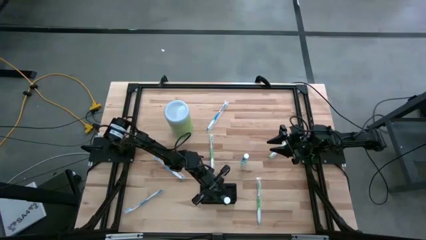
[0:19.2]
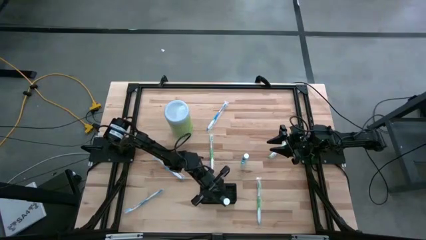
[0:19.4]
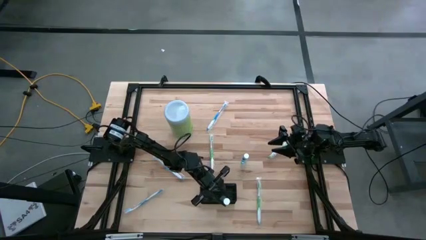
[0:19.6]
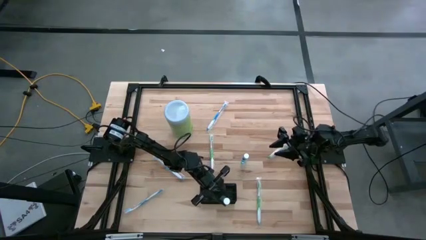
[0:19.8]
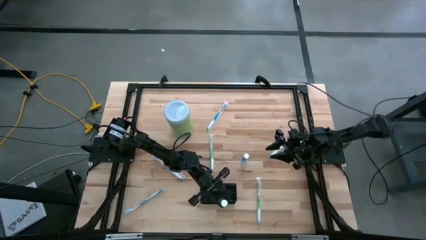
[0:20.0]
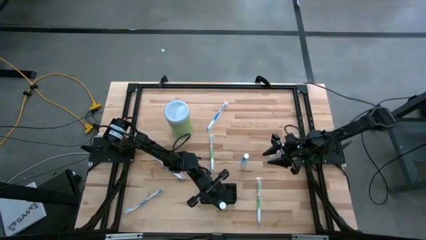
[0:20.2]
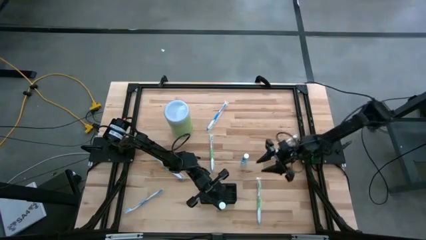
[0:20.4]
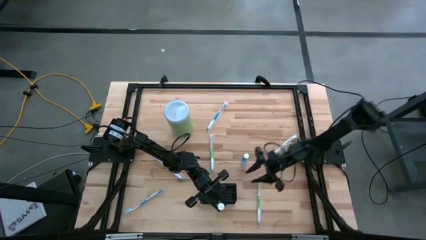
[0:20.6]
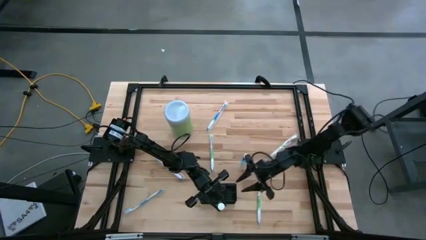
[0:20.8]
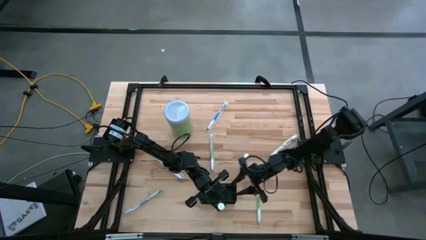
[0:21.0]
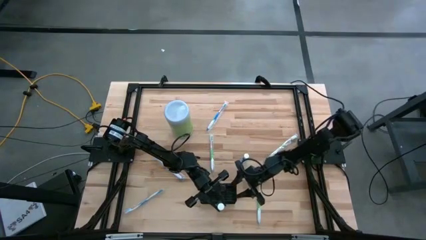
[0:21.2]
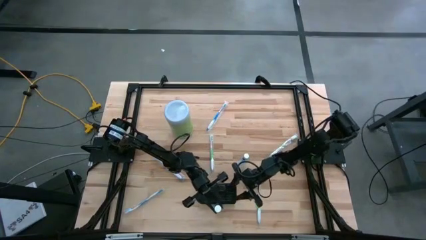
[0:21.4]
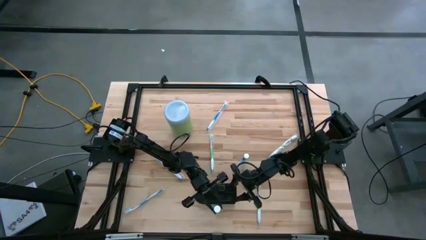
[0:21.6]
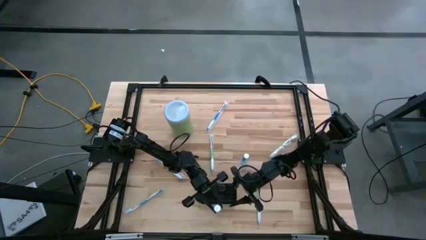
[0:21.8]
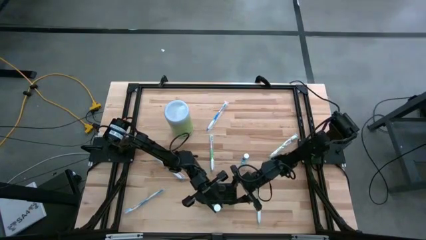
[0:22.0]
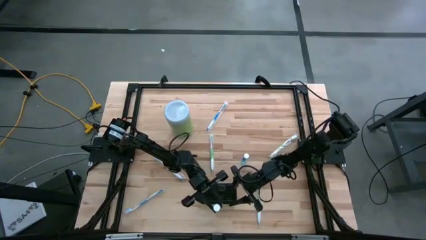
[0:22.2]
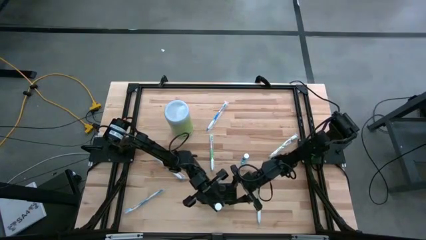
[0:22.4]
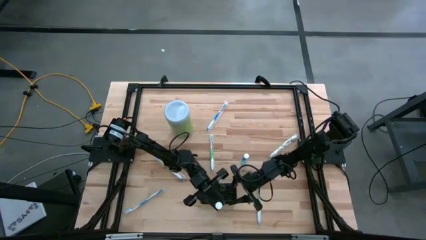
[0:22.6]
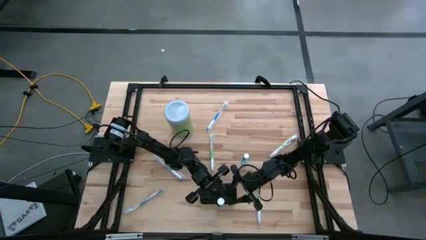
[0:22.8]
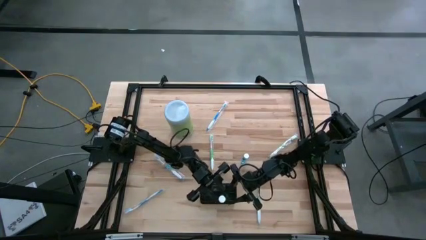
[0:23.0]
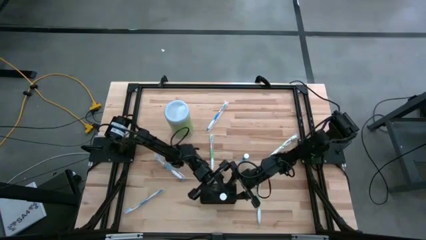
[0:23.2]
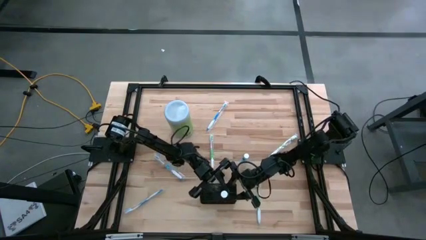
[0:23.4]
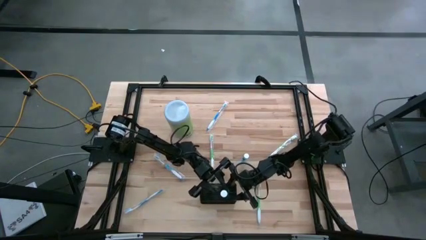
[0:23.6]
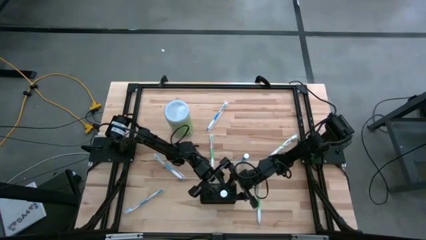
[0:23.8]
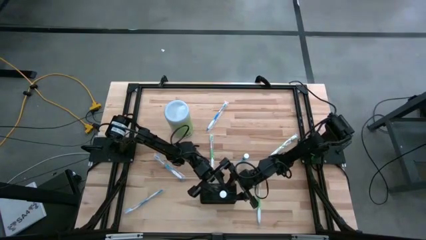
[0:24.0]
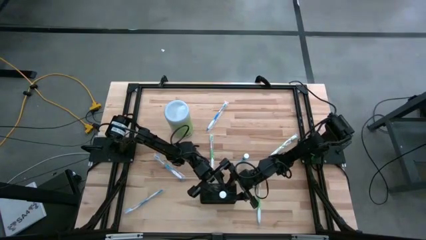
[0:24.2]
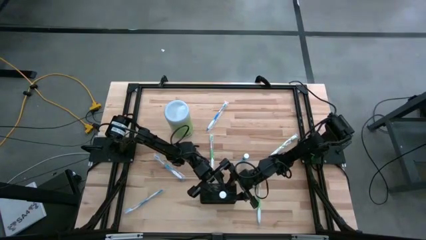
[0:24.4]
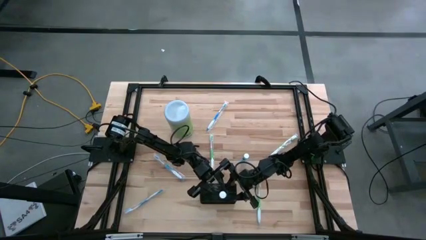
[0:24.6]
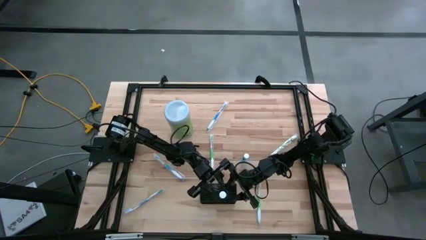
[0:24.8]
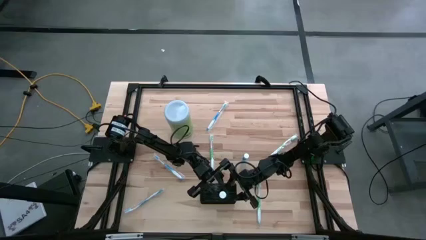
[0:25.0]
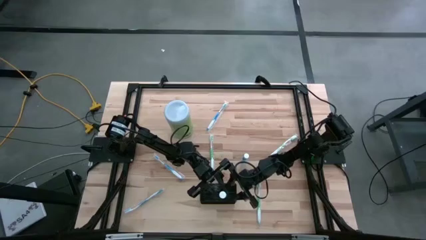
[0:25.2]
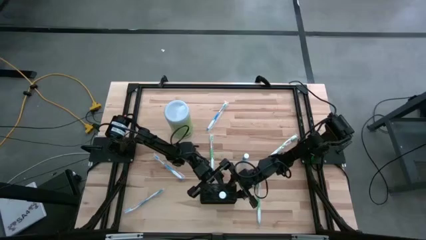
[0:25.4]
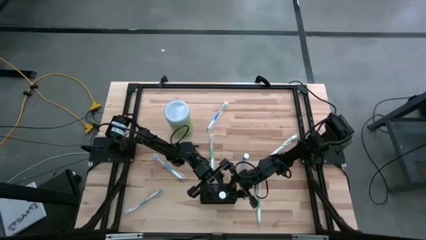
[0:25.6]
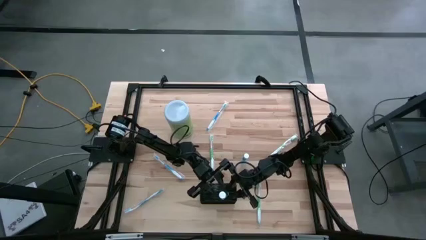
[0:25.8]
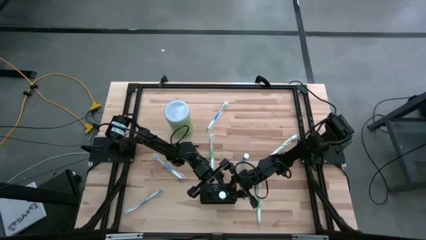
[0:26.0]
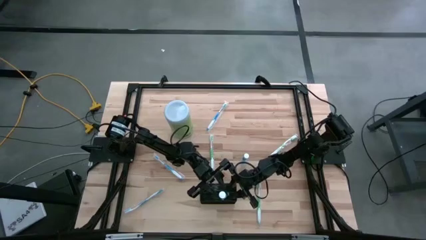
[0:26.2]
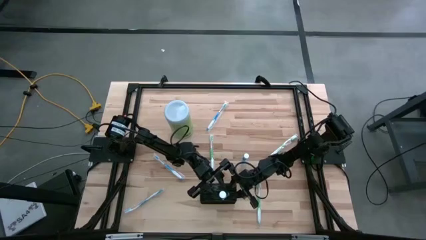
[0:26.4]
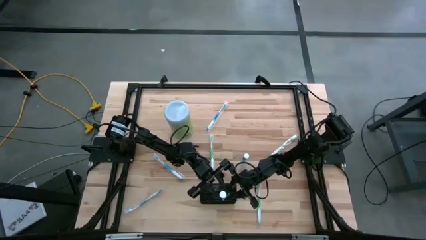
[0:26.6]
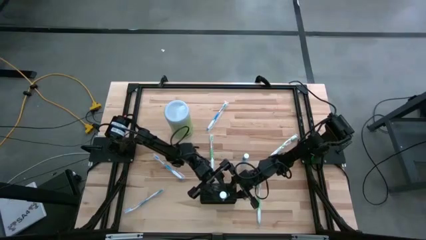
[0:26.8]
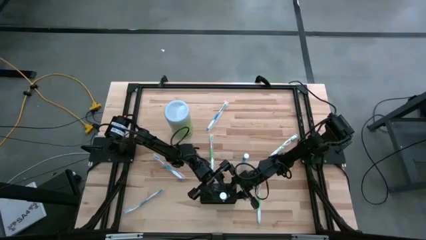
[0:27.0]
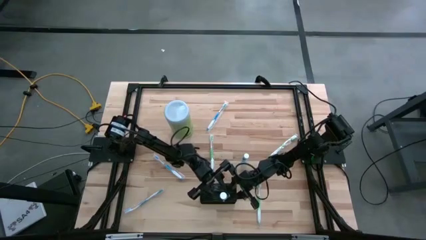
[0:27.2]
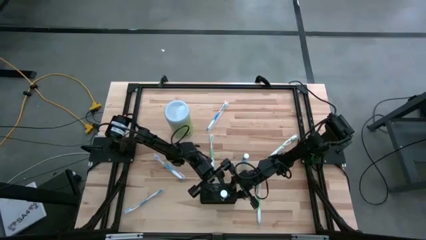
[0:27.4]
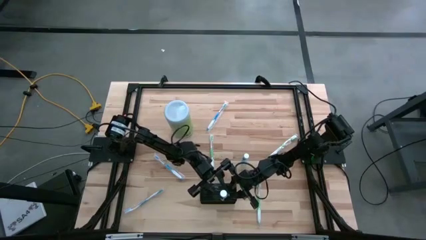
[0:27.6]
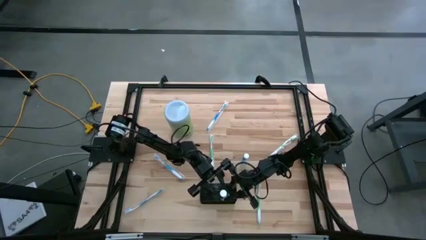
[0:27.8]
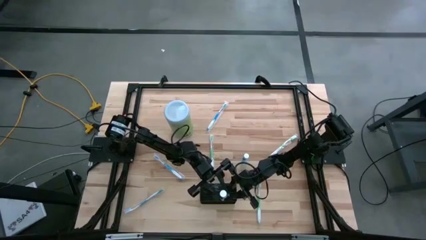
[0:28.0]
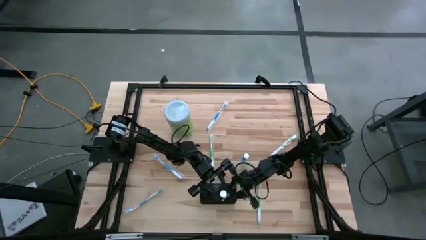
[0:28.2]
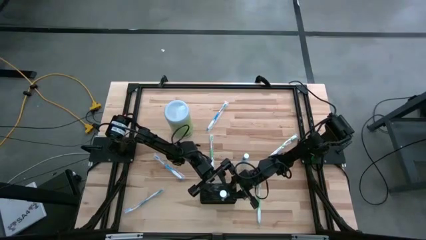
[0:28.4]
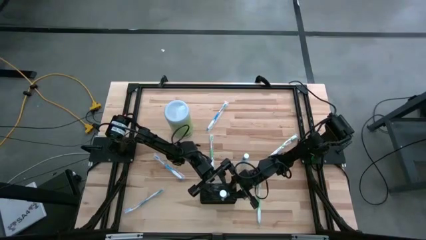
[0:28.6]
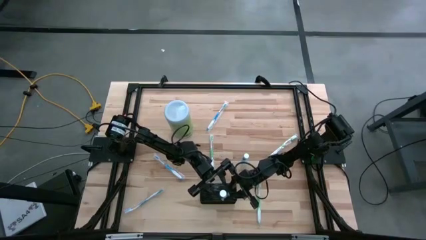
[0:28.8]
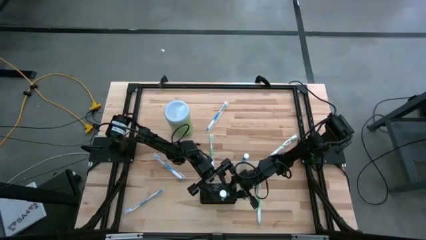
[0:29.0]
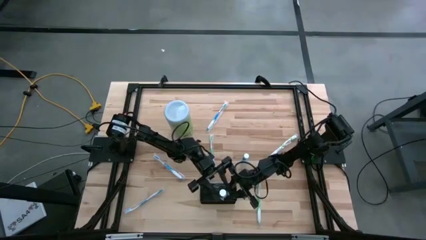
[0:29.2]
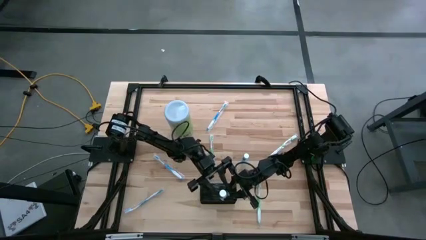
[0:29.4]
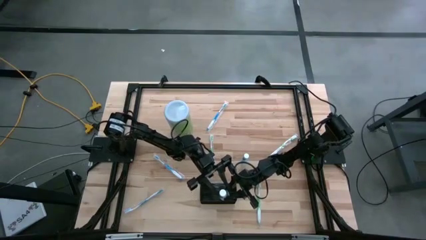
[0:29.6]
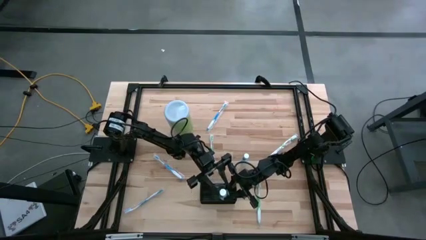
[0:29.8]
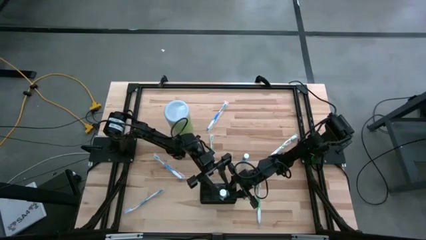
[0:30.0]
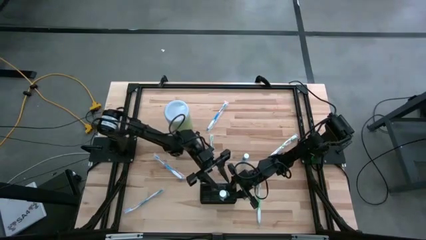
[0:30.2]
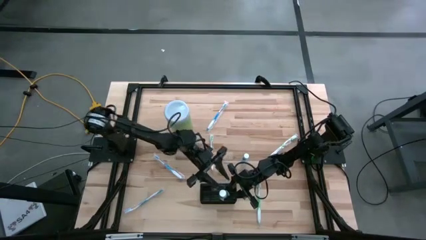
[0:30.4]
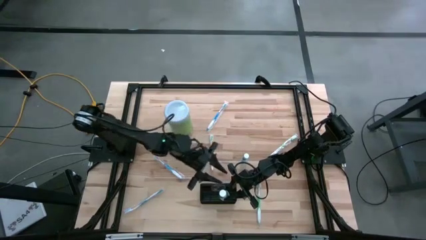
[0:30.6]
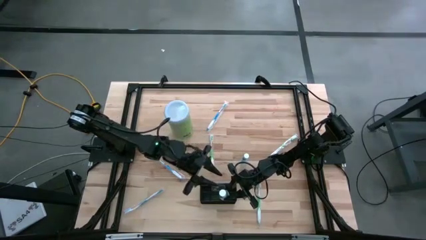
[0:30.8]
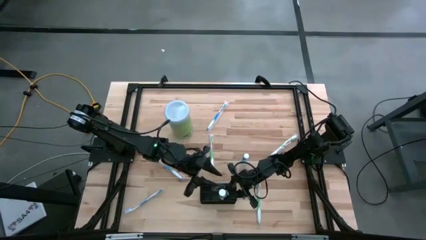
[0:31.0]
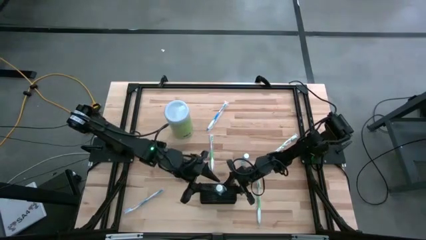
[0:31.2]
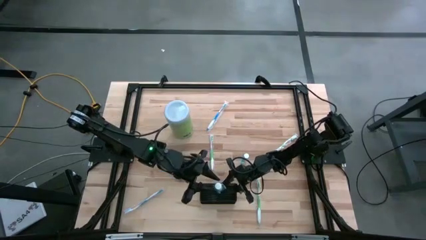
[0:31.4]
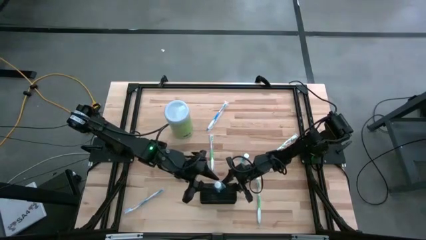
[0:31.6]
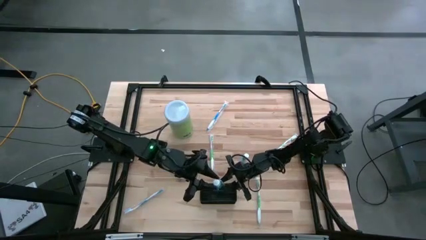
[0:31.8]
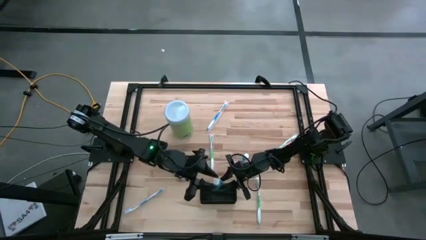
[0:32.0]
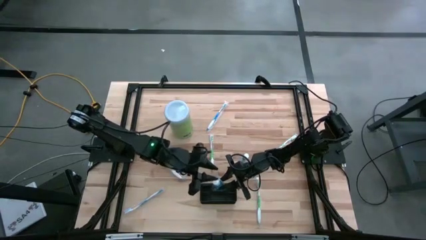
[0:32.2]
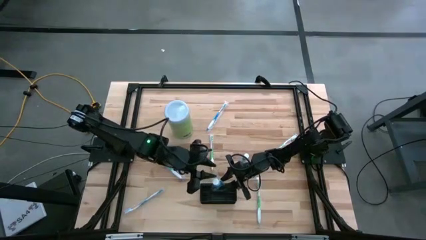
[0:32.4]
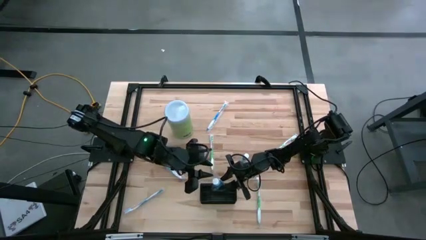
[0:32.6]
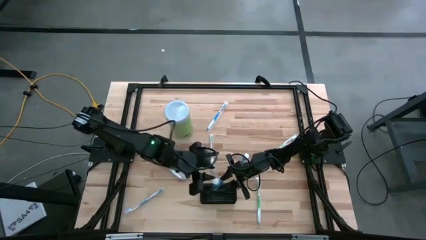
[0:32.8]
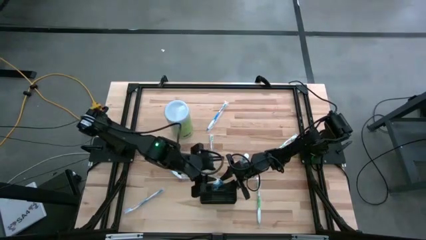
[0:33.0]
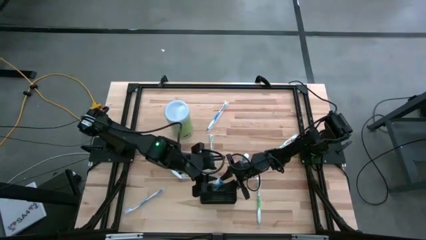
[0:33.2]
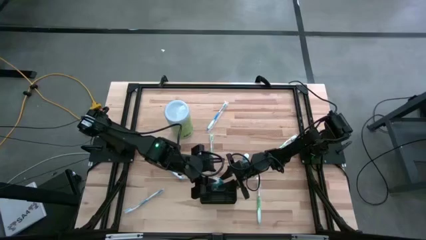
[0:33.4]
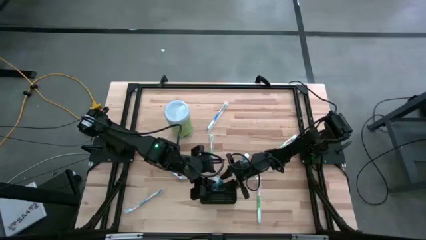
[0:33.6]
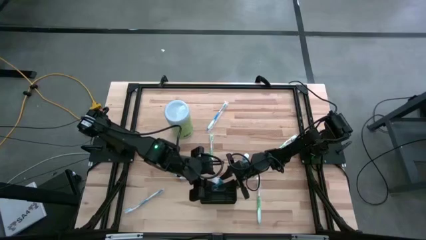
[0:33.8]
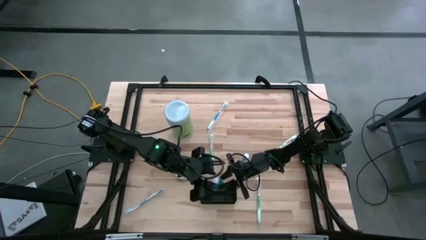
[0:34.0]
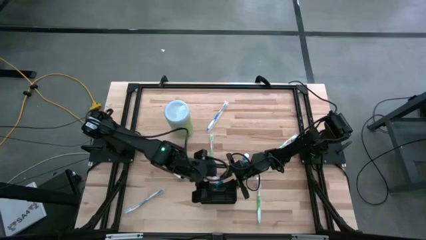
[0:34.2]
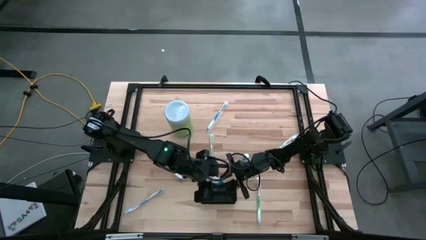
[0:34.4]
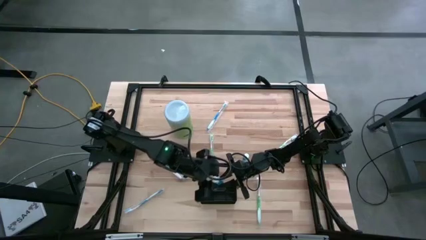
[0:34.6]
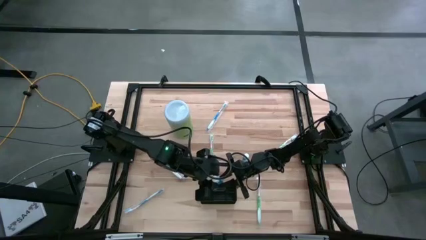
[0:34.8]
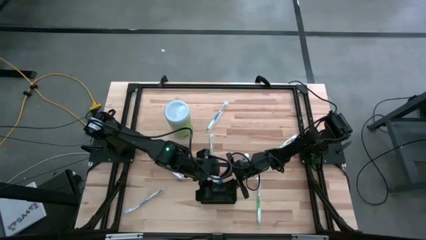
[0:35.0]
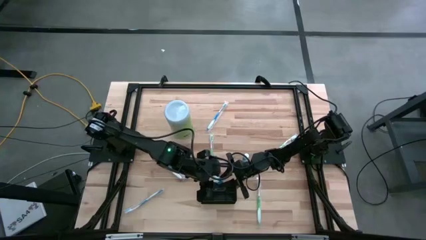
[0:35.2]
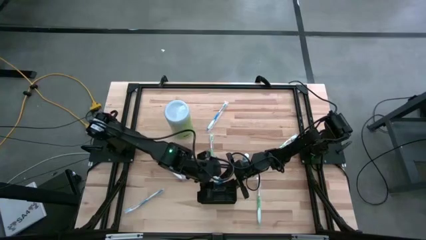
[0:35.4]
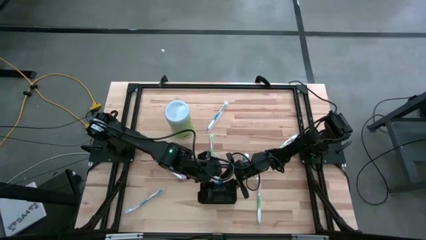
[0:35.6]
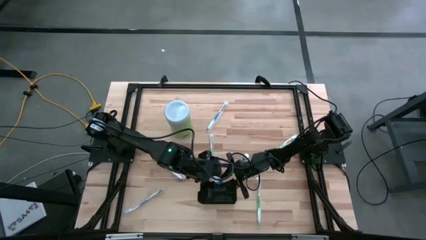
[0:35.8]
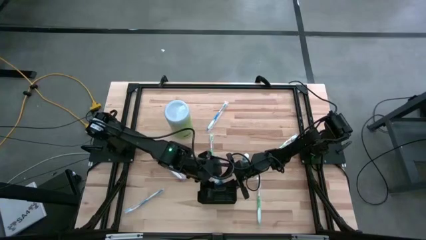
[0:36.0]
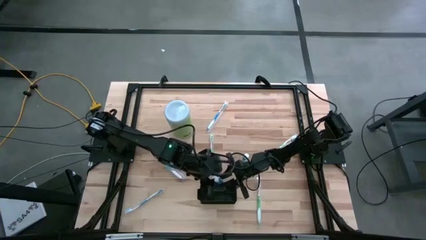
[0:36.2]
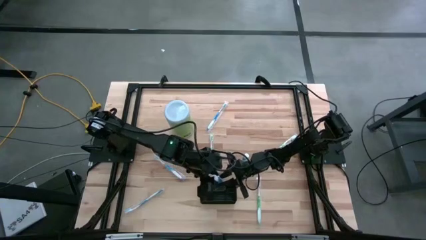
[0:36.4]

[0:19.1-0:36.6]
Task: Pick & Place toothbrushing station
Put the bottom mouthwash into the mesh organizer
